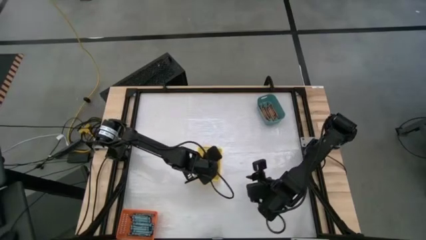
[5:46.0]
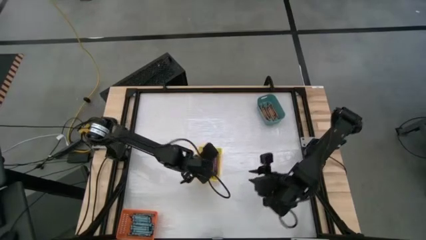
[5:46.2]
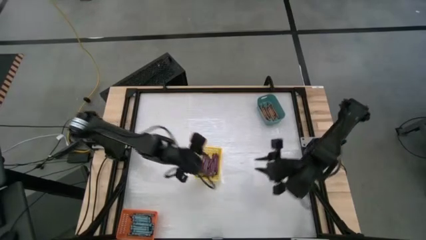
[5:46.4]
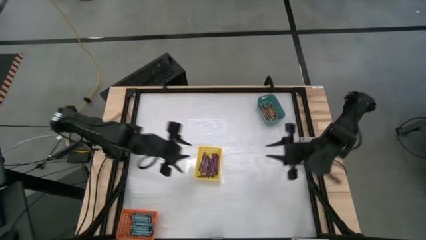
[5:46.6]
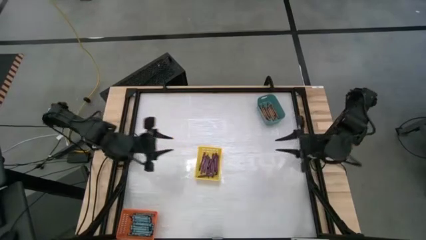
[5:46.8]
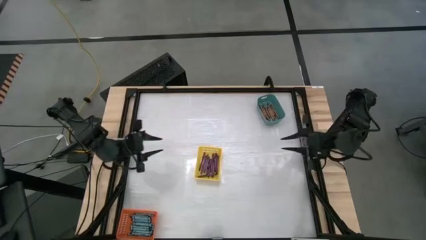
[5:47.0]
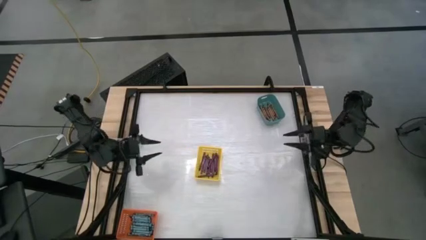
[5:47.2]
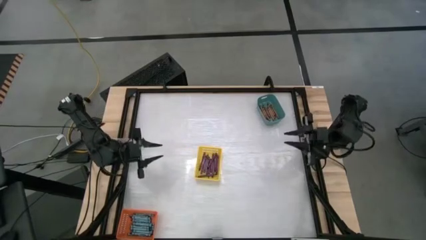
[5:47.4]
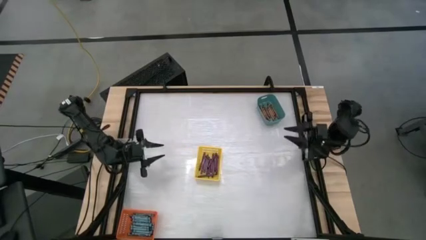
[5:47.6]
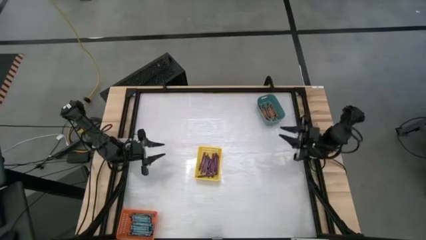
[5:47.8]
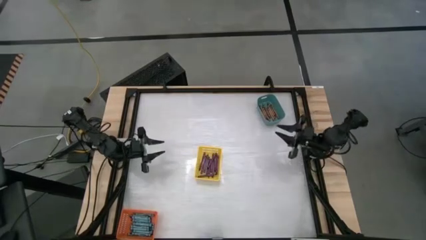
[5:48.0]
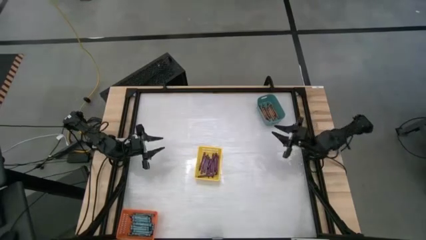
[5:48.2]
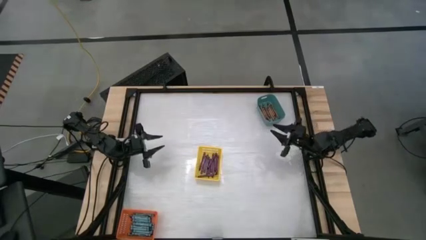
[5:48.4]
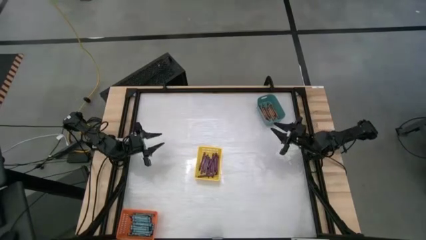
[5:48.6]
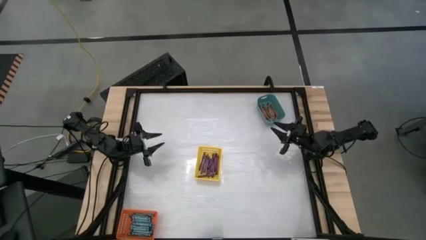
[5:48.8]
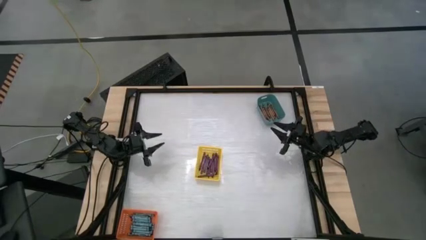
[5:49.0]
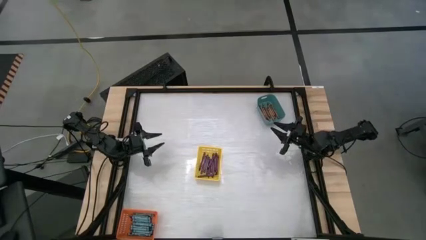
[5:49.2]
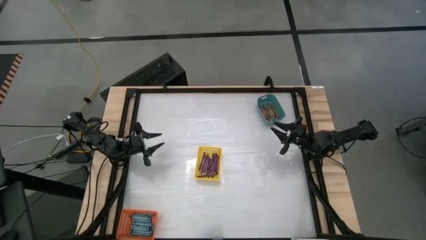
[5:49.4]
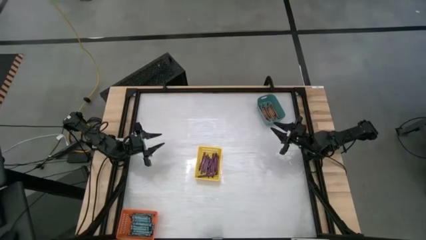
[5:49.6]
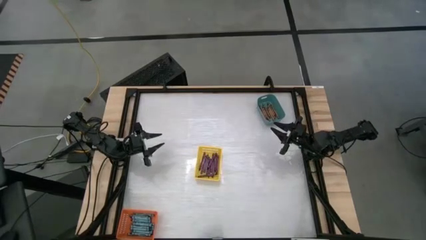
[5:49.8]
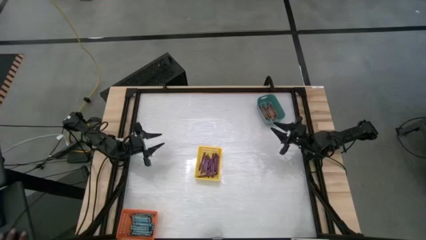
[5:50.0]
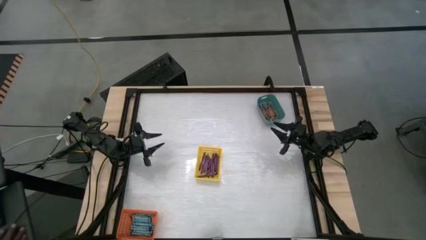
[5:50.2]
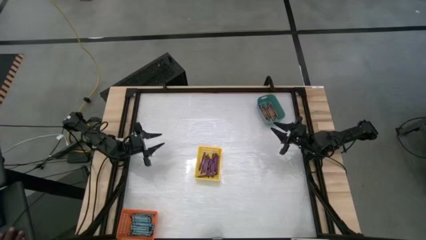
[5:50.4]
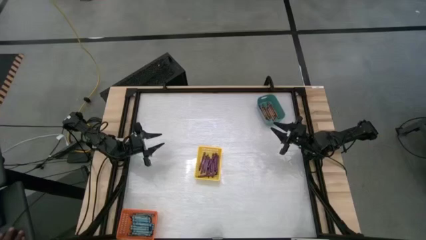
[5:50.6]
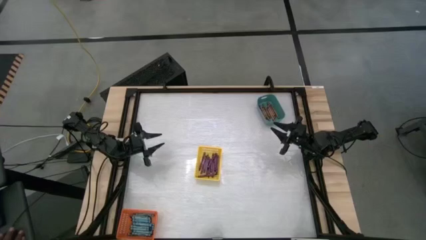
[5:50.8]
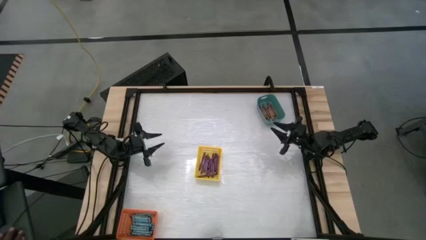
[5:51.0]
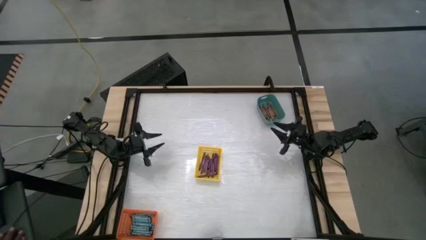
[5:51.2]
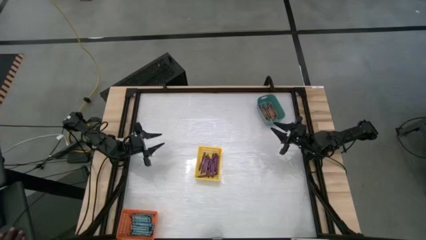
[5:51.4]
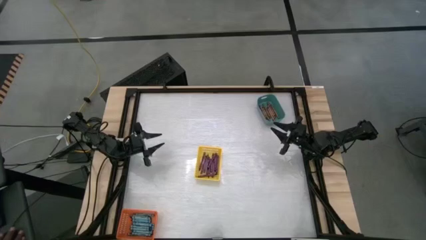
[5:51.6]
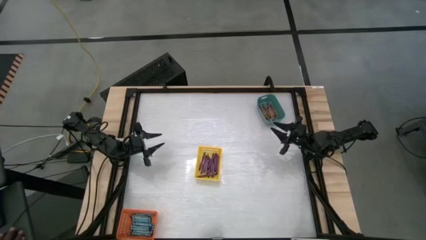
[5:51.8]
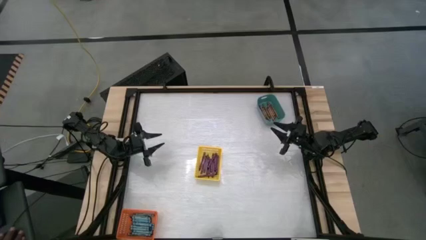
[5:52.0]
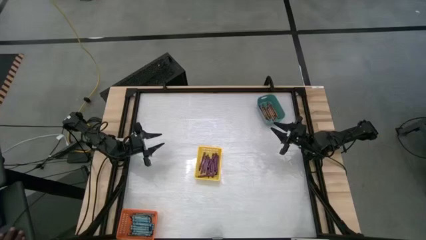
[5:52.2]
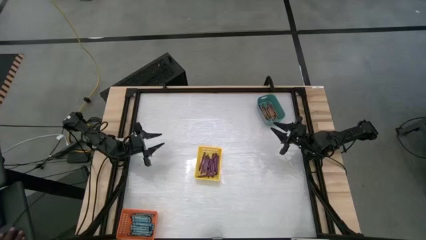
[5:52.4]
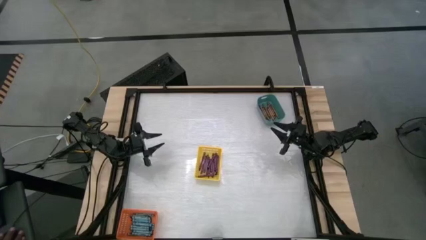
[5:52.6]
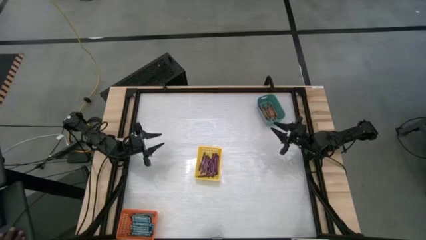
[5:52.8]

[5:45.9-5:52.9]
Task: Sort crayons
Return to Home Position

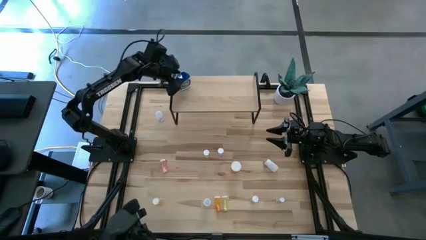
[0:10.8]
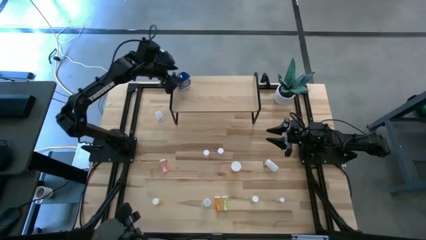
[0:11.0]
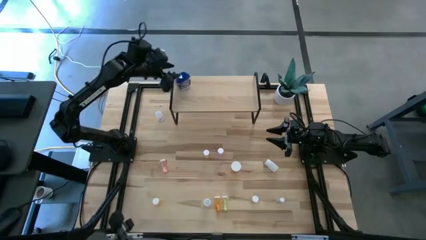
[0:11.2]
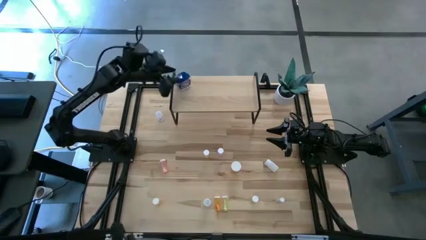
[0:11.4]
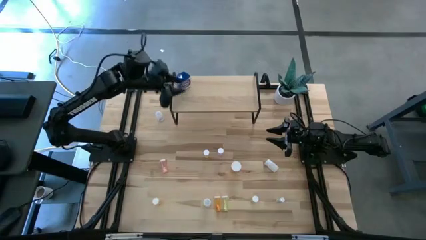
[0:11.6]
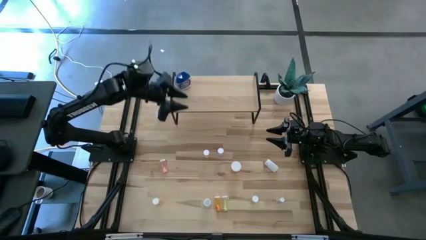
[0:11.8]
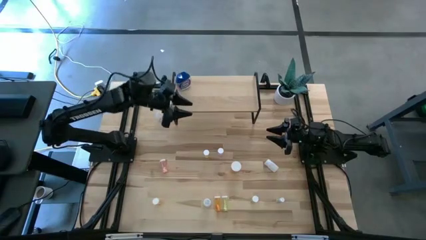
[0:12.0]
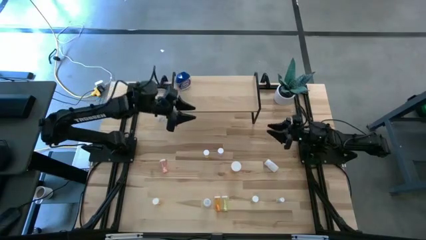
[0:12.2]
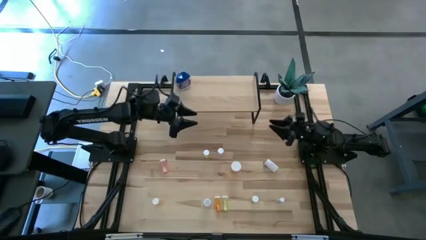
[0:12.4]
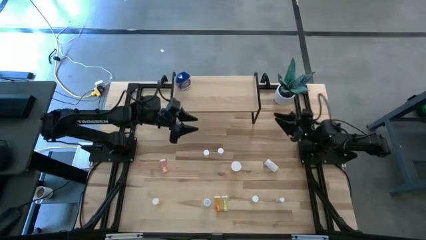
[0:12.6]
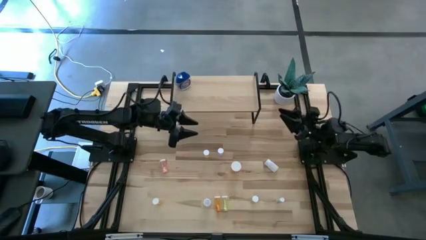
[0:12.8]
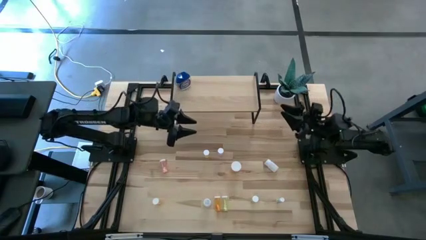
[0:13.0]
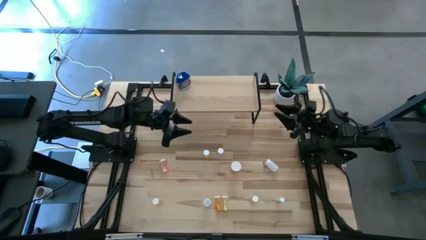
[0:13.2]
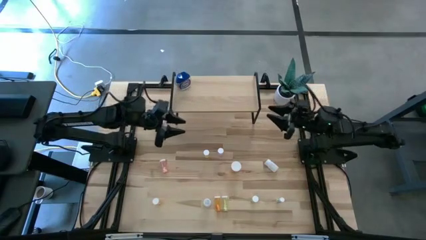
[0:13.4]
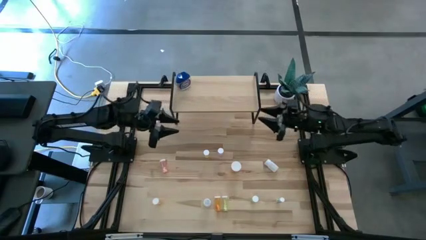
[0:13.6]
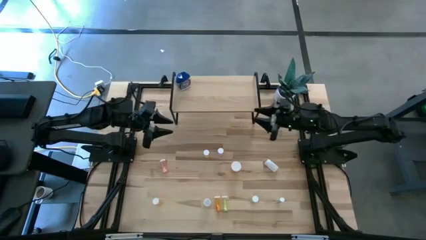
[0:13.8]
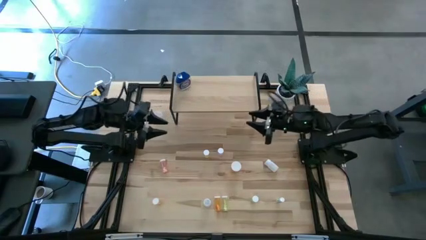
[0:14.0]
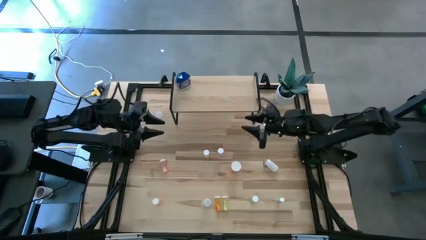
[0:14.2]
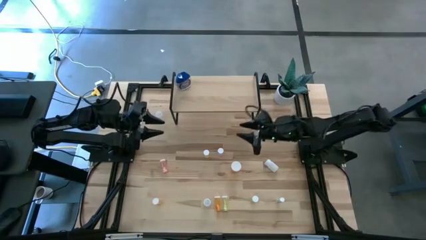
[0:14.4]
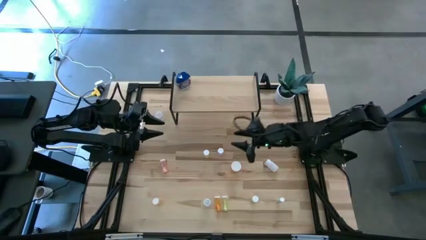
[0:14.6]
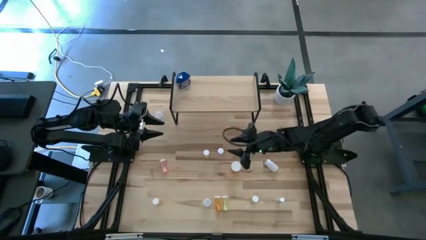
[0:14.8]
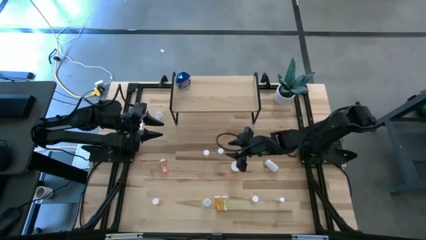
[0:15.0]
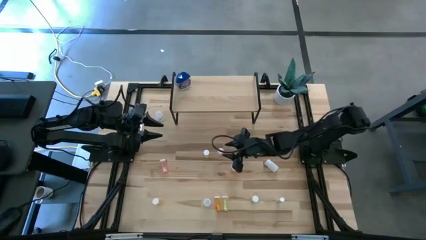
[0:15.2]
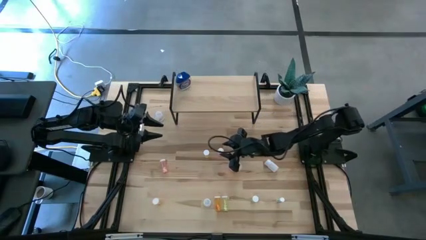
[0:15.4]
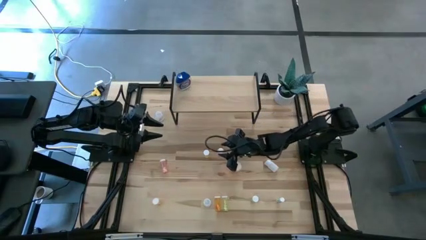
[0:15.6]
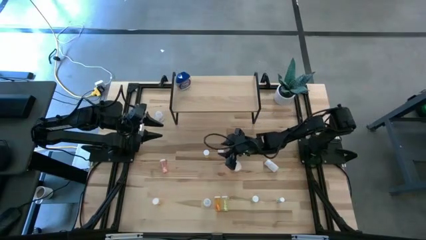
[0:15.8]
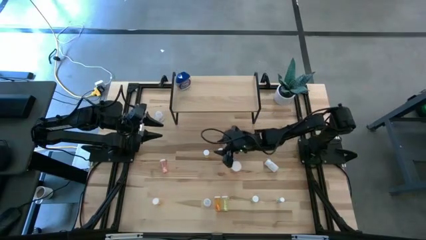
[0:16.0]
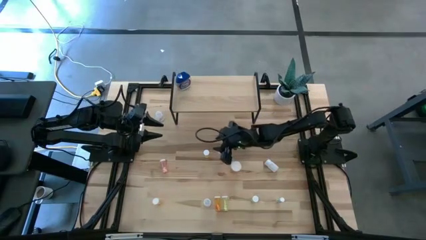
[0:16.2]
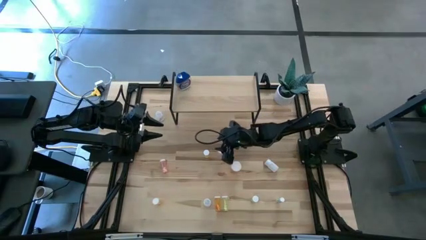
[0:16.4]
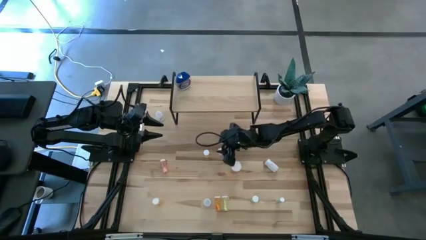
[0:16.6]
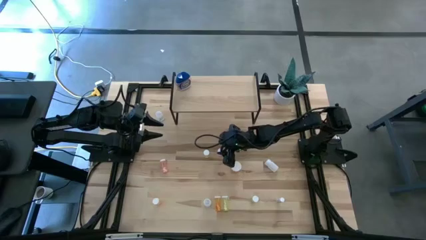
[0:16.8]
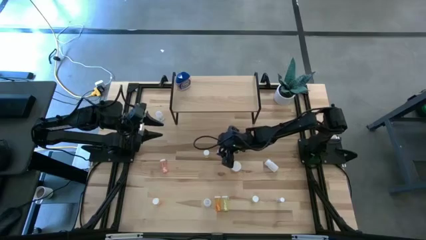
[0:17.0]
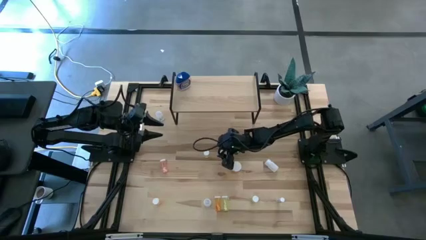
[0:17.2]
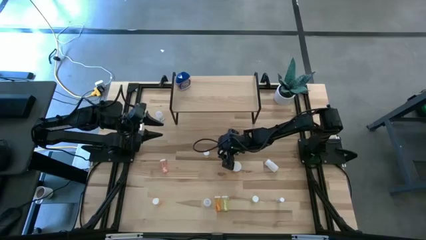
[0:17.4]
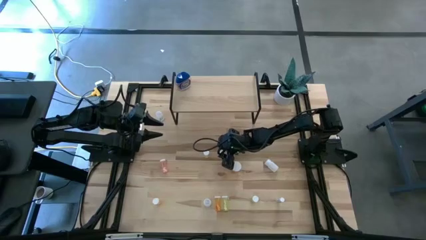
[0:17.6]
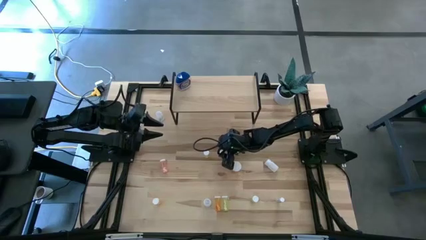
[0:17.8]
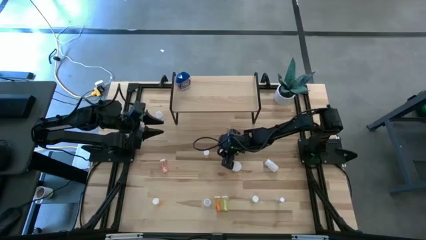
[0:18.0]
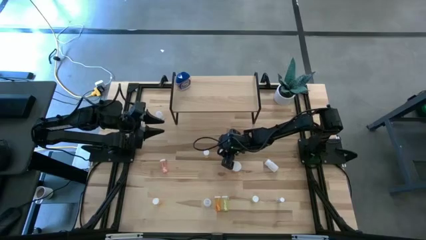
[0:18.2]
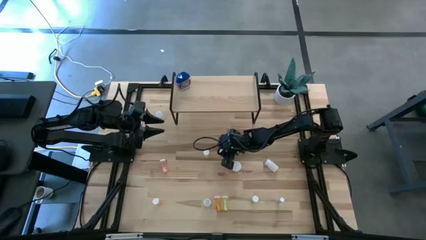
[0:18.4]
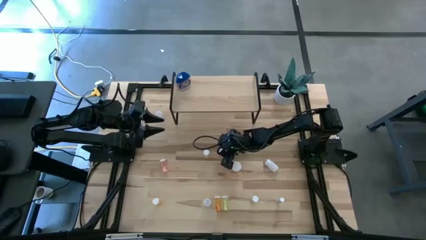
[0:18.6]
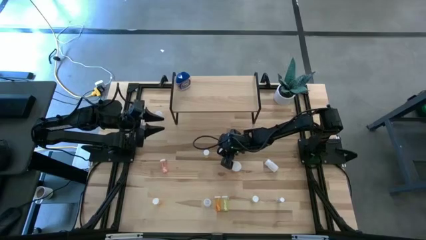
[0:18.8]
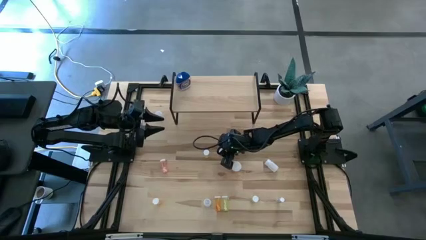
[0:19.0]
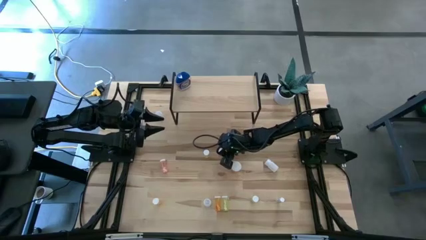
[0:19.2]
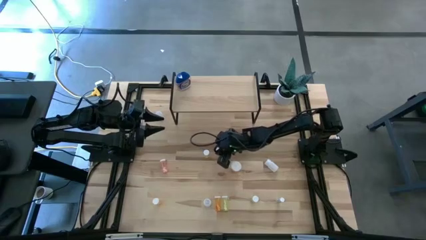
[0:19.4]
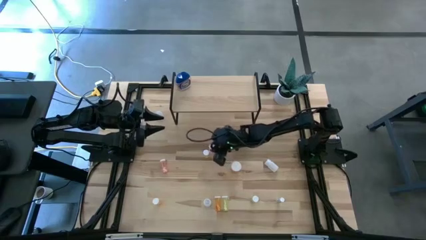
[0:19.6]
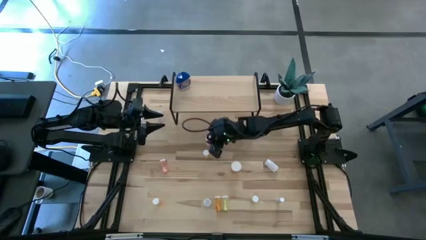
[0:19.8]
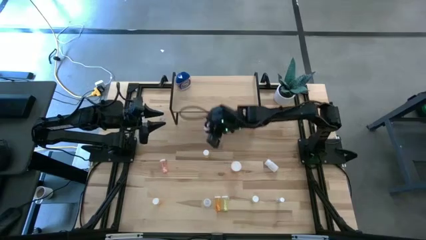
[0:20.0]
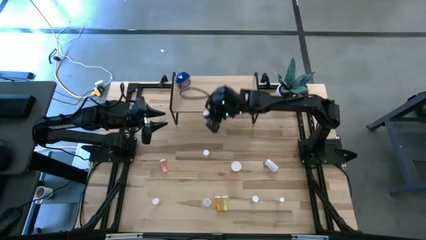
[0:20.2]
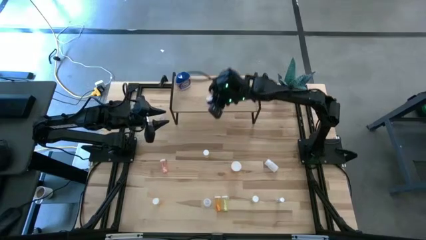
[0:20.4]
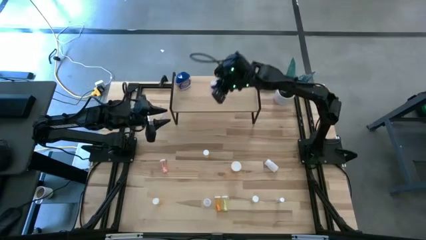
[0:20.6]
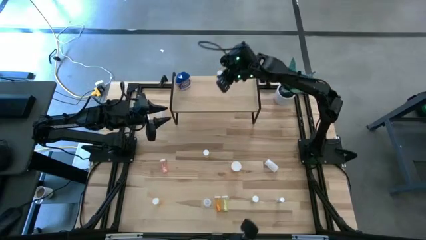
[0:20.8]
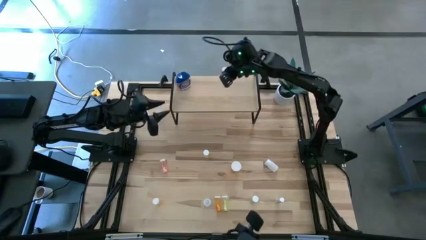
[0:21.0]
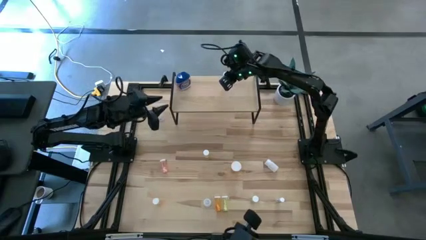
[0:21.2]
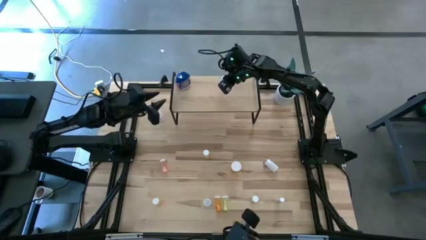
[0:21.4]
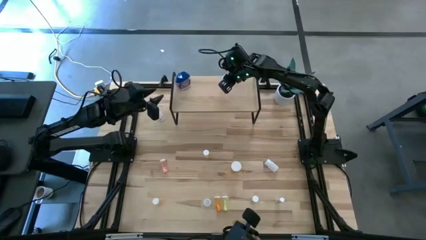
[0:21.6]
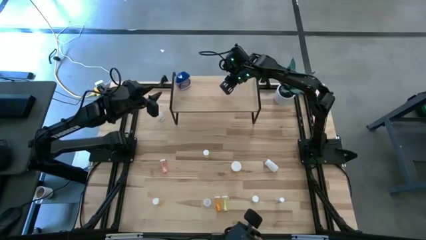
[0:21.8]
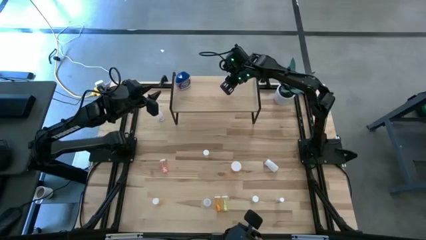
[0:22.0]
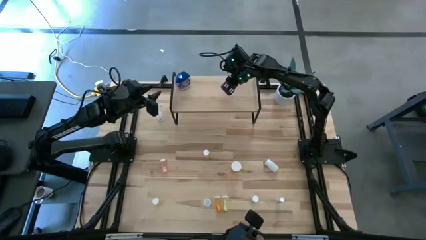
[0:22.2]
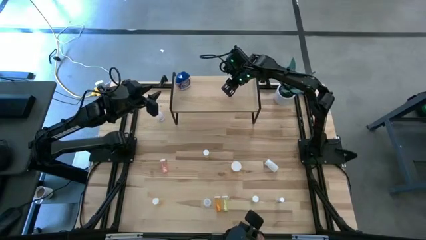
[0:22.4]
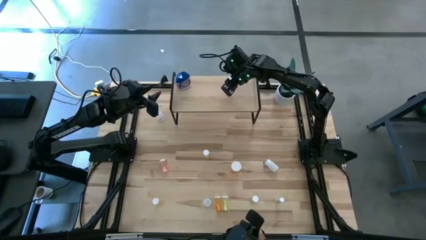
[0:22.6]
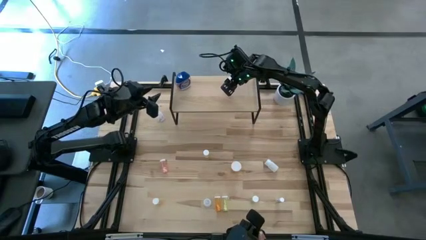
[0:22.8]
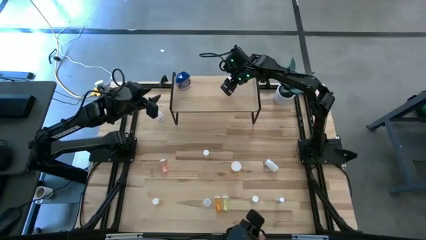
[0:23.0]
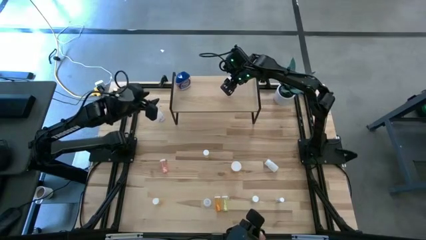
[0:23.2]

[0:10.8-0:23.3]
Task: Pick and place medicine bottles onto shelf by color
Put the pink pill bottle on the shelf
